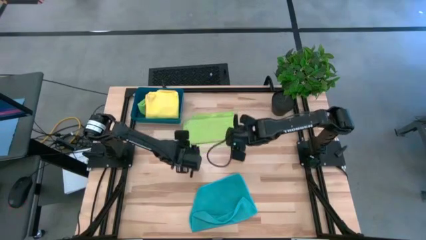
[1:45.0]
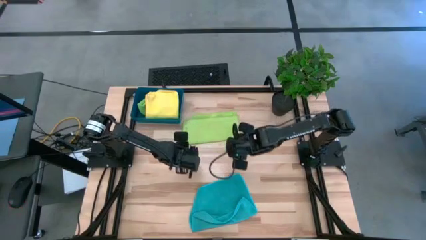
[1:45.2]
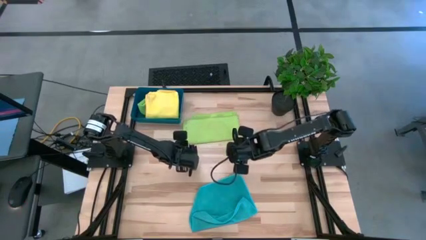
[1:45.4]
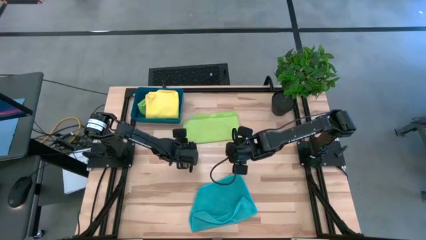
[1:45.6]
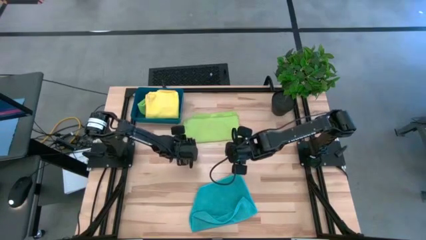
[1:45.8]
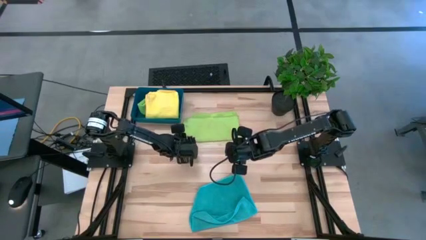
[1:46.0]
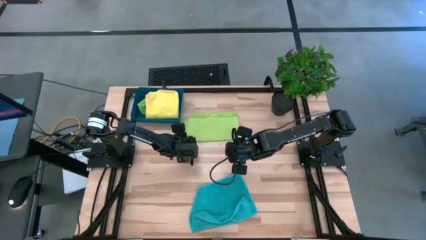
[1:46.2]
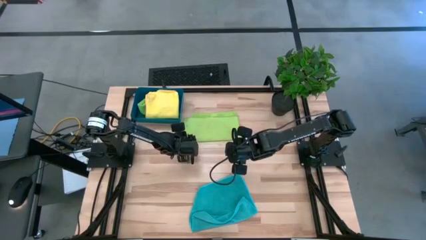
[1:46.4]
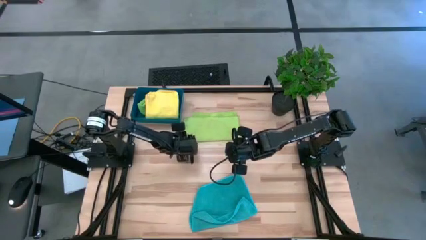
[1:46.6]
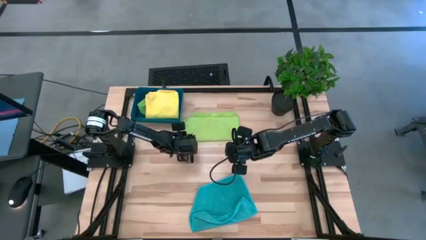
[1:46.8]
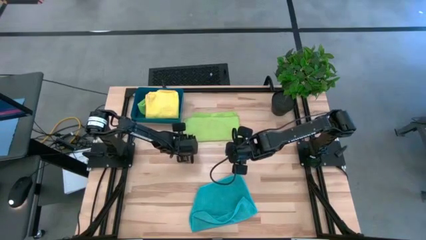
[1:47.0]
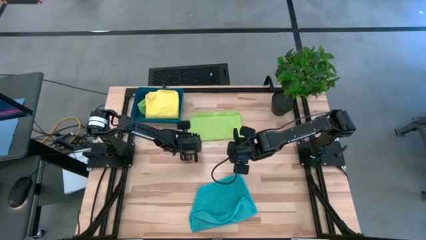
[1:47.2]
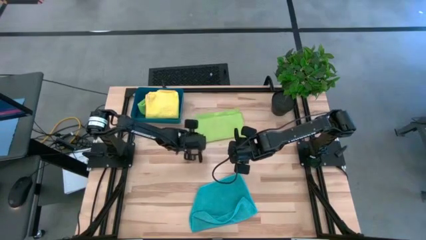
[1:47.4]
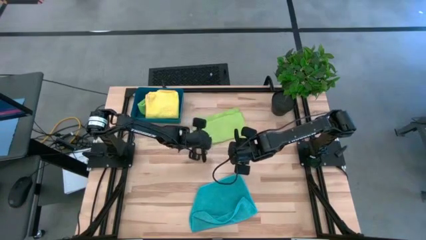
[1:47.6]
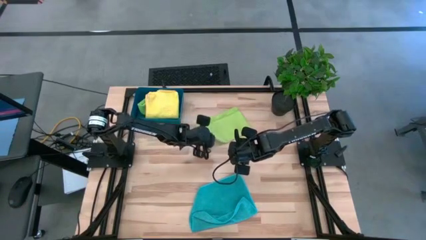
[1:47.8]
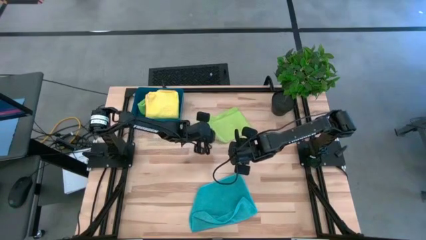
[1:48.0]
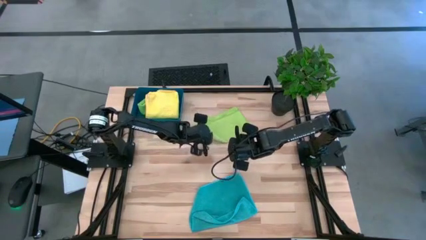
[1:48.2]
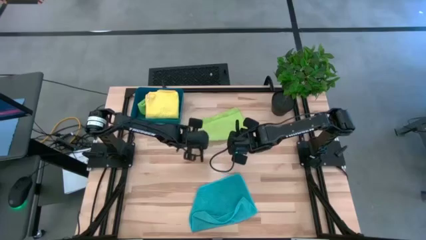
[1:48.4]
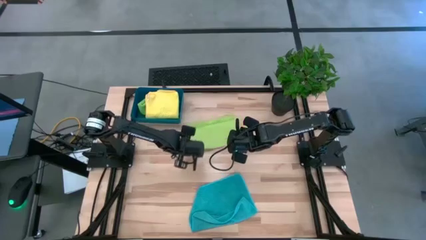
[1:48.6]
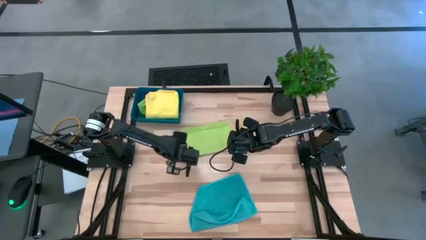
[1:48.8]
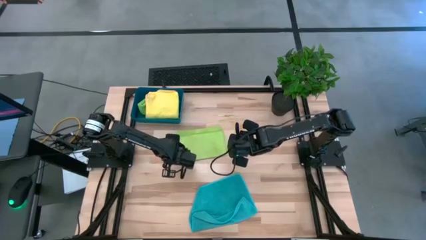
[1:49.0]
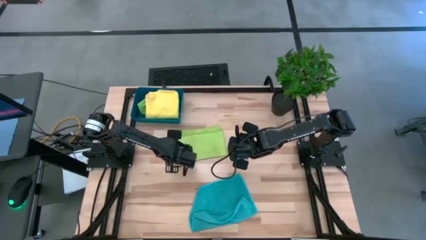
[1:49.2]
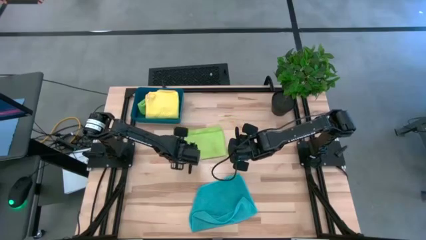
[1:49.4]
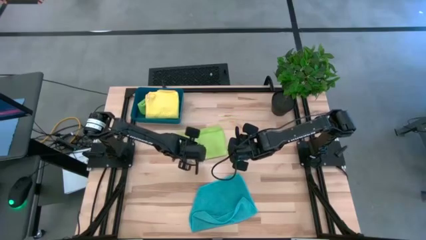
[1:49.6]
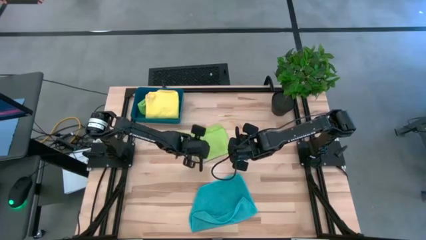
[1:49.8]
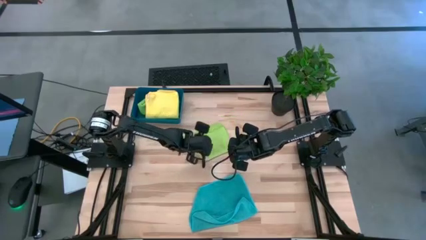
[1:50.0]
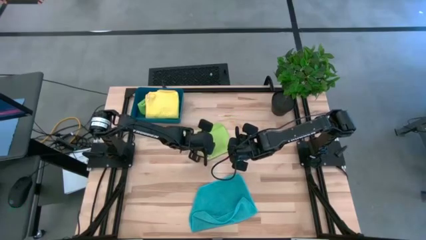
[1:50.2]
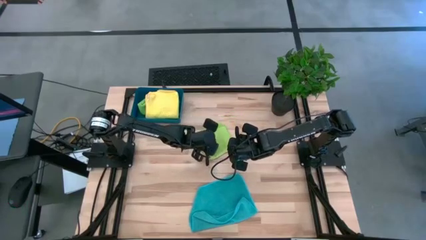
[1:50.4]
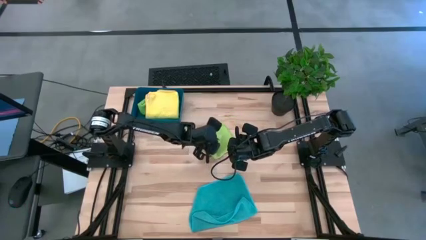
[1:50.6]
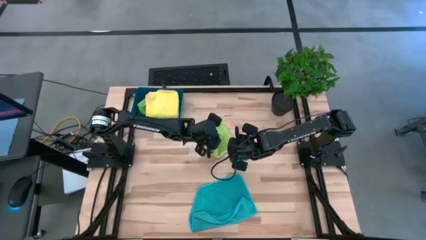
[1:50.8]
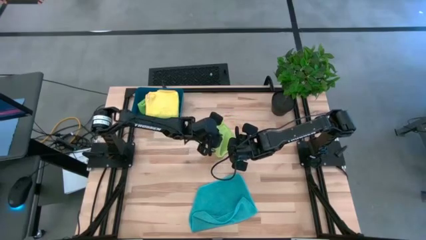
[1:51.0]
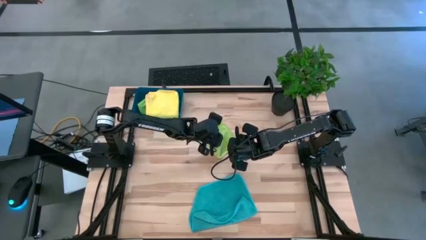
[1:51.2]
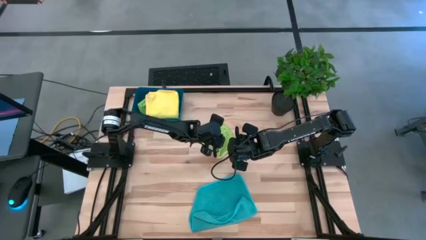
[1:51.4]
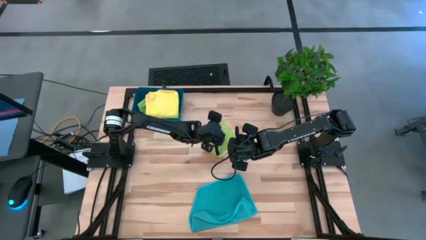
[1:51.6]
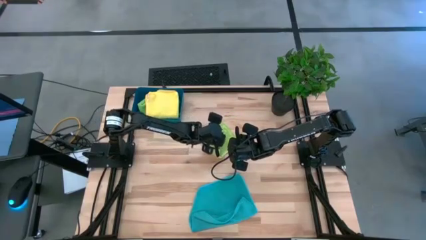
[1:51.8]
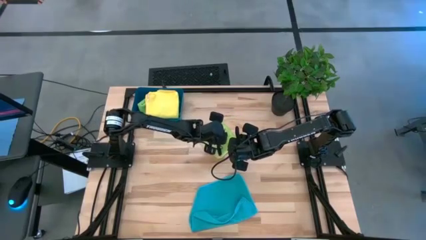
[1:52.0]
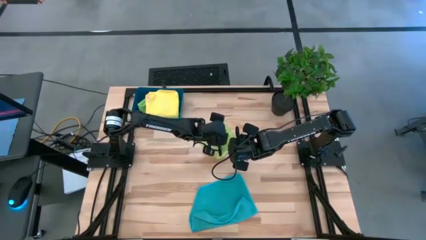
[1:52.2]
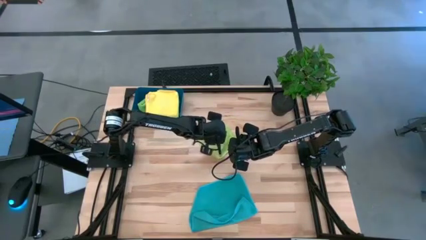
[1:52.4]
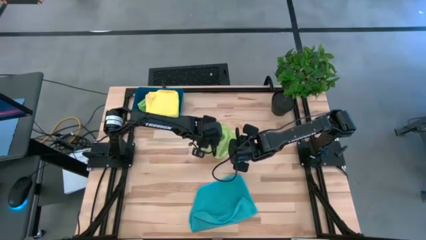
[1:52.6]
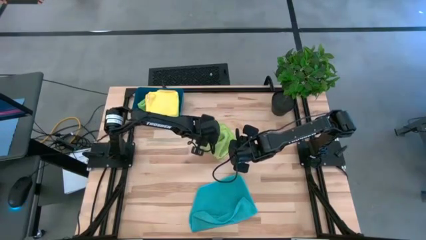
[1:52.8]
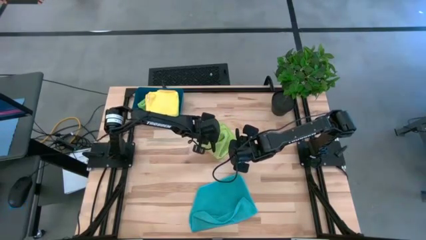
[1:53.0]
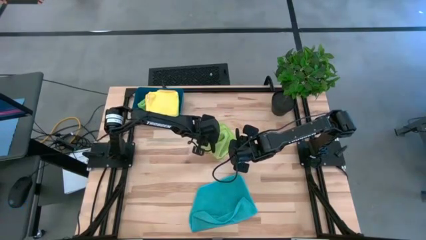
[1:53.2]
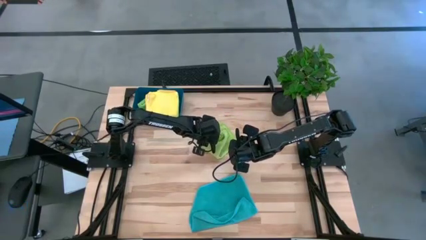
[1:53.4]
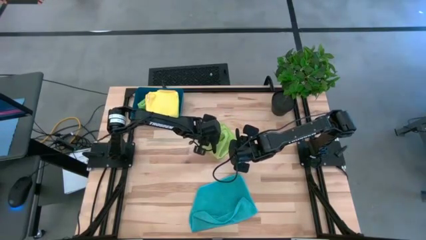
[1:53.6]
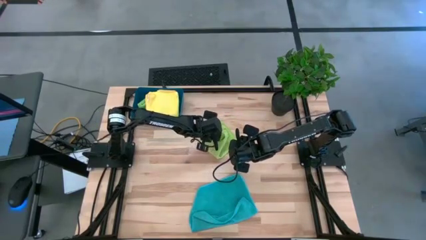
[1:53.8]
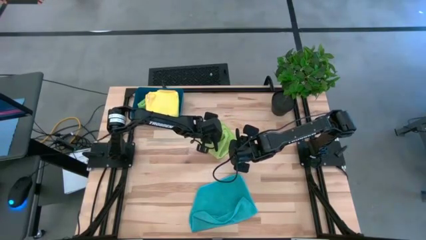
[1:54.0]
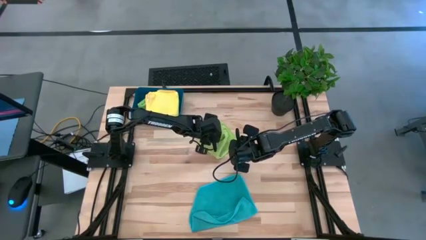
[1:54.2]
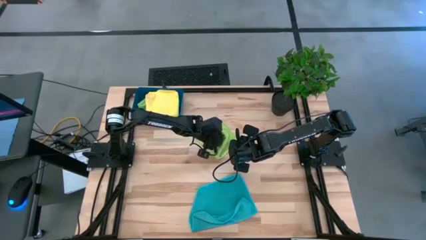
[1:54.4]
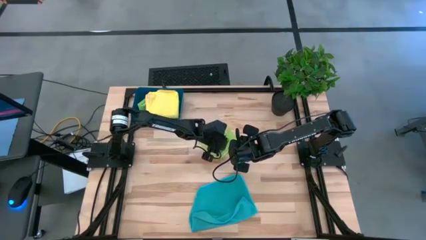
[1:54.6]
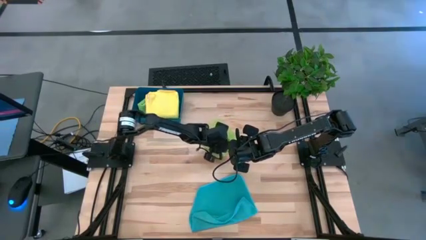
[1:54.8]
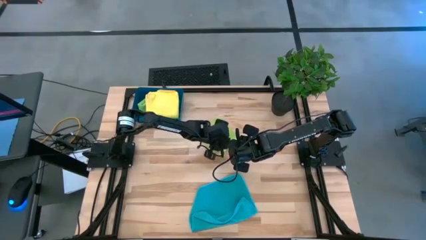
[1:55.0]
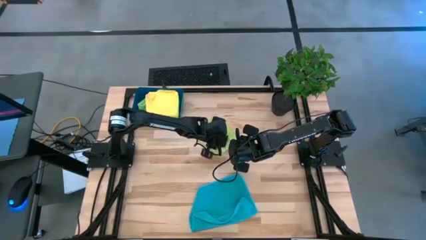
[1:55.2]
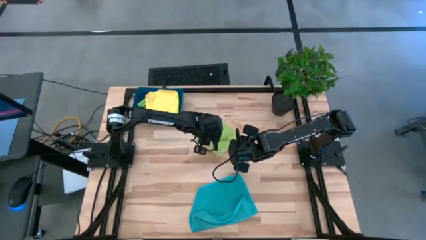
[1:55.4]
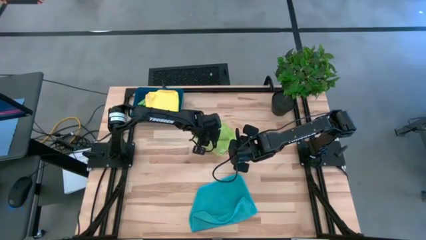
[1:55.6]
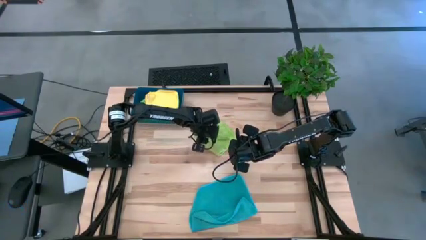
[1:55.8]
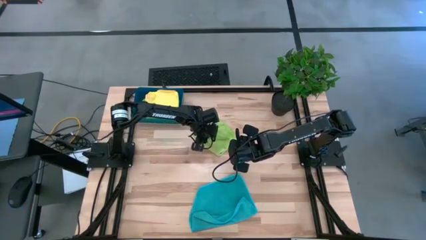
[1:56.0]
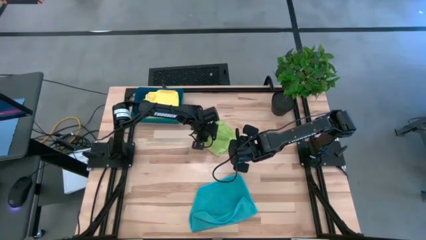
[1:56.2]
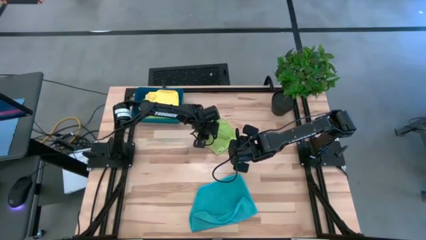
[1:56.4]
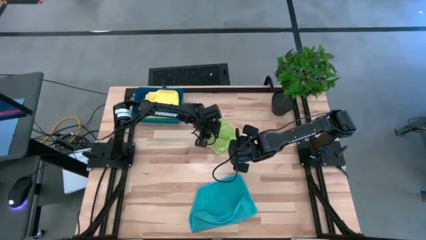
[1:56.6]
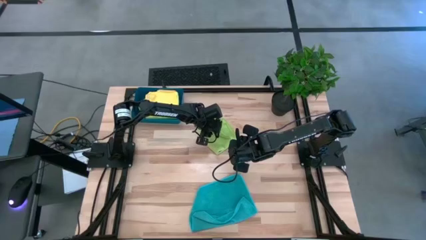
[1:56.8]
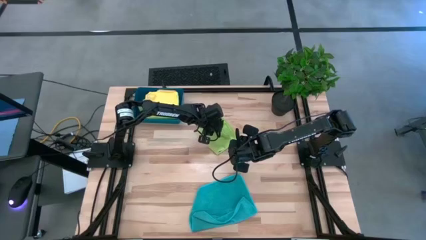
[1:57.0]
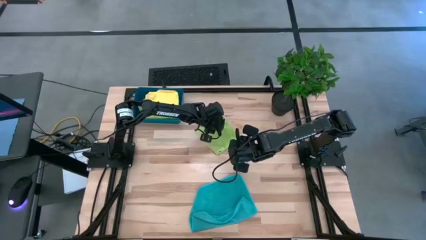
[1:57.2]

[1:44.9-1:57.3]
Task: Fold microfiber towels
Fold the light green towel

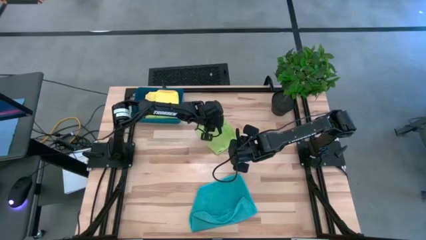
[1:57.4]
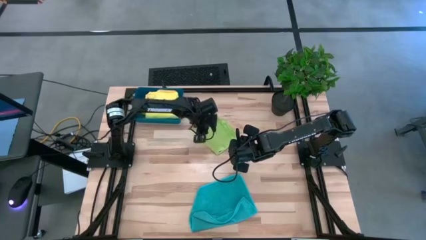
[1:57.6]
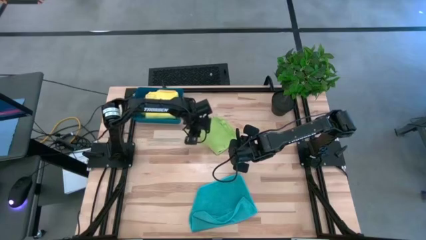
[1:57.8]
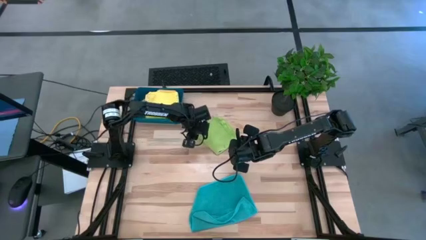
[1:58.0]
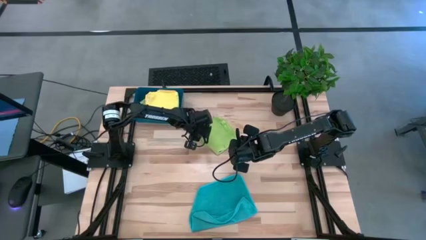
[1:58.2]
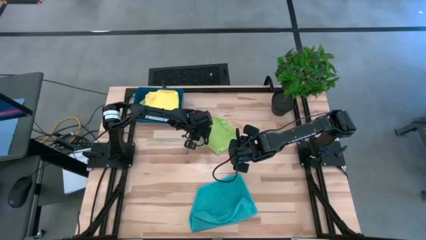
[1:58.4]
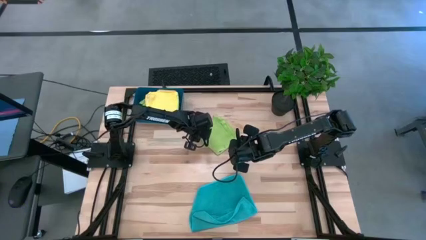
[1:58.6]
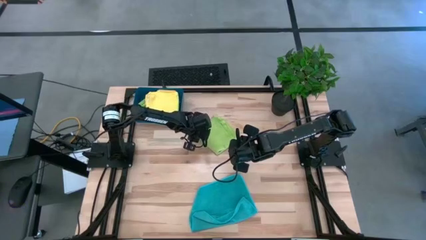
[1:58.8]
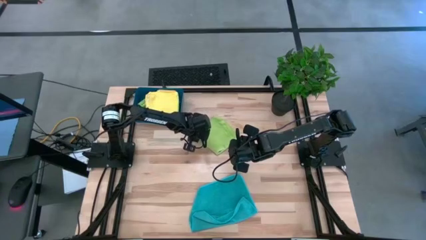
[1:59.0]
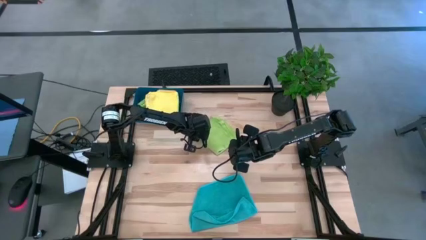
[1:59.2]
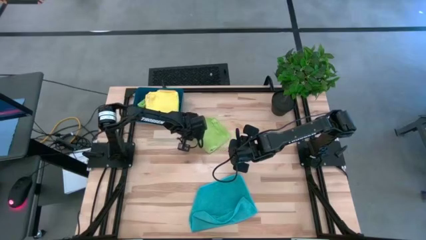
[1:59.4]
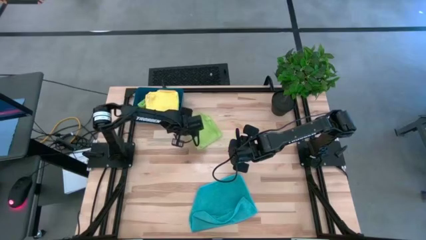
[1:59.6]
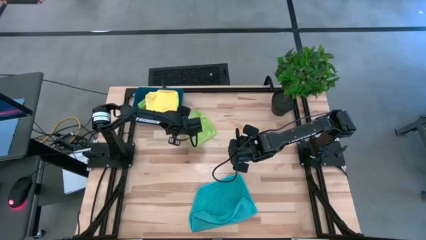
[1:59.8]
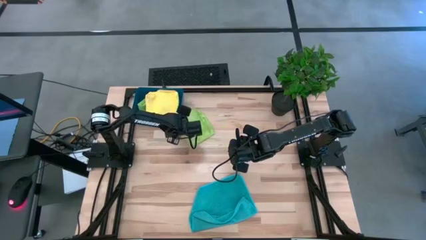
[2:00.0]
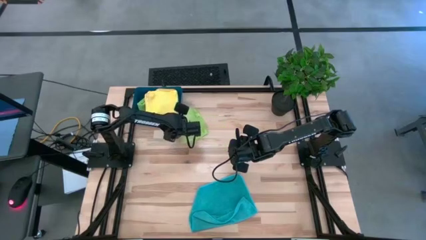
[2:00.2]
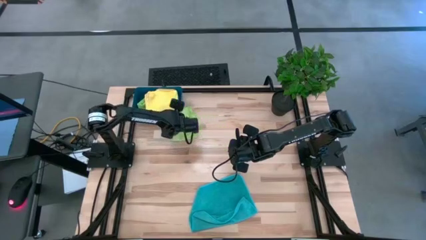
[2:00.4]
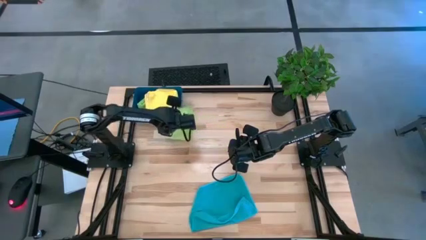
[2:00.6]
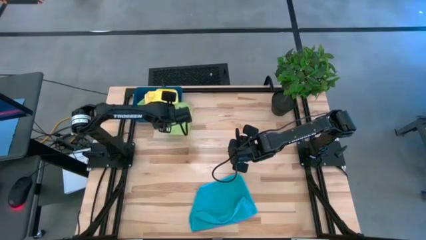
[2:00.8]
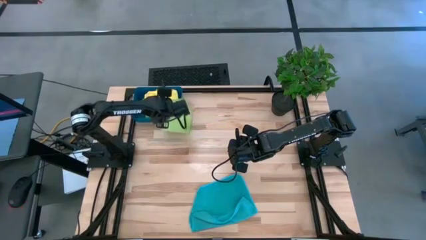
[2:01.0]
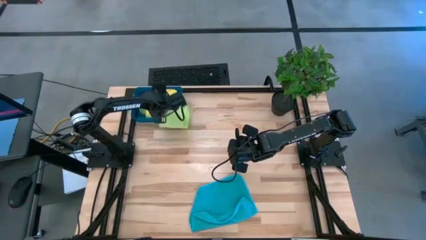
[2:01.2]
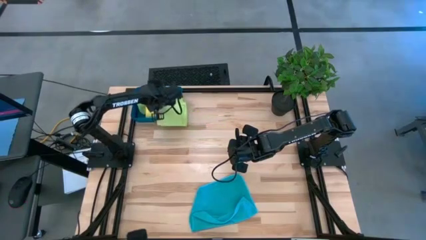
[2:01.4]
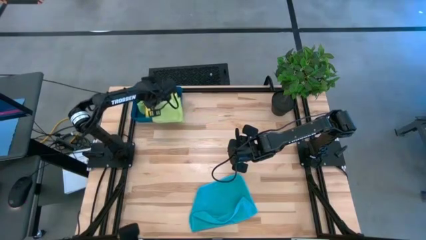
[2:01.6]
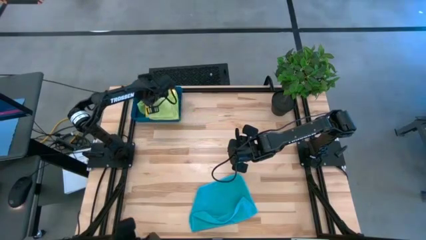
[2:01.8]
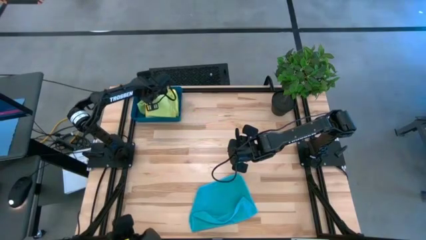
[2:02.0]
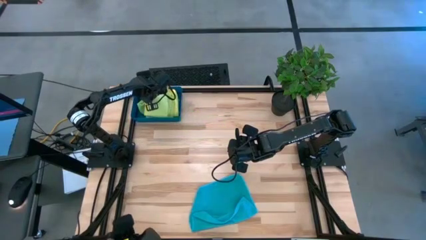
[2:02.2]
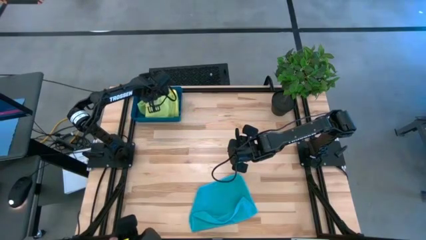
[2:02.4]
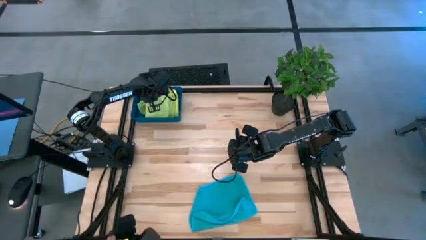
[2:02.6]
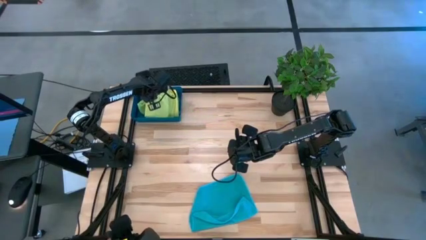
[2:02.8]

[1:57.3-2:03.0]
Put the light green towel into the blue bin
